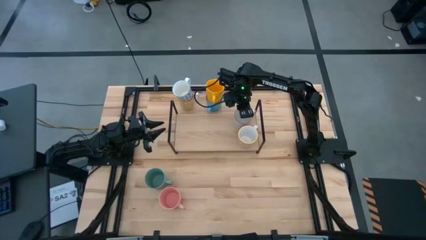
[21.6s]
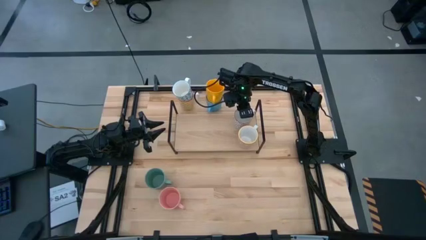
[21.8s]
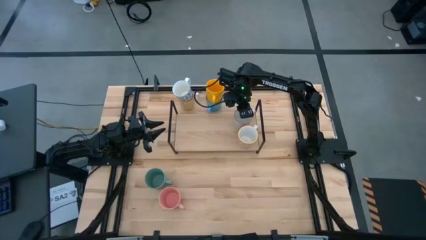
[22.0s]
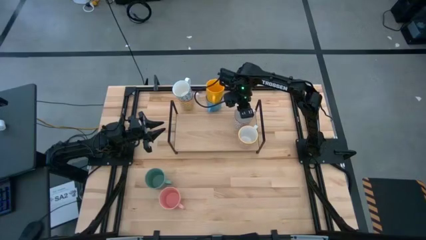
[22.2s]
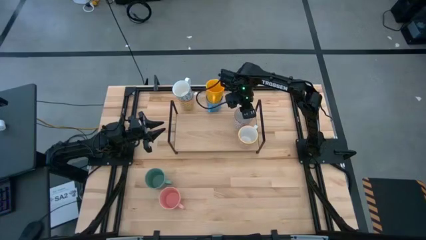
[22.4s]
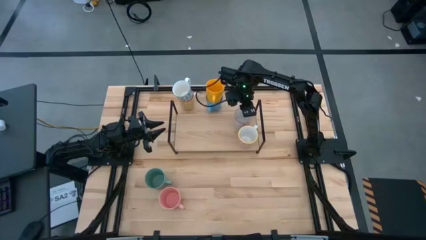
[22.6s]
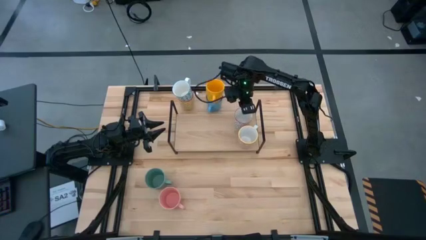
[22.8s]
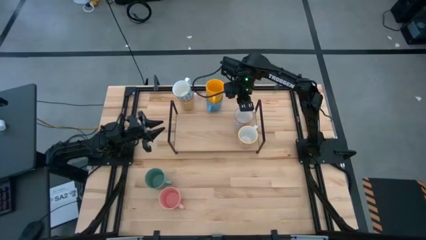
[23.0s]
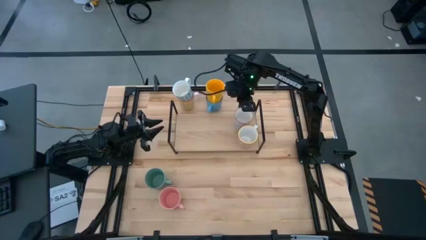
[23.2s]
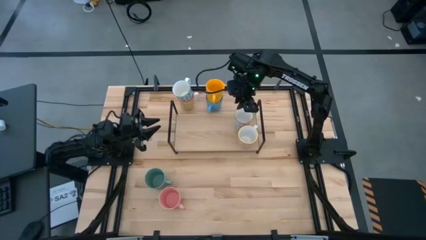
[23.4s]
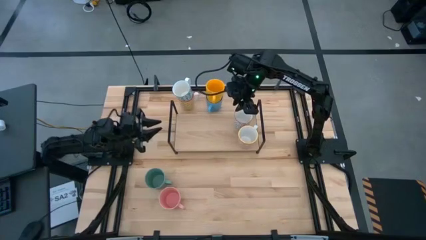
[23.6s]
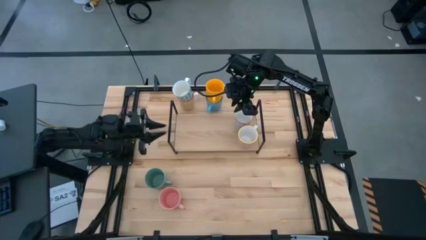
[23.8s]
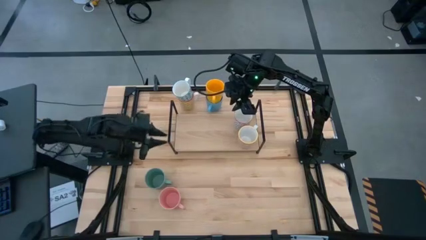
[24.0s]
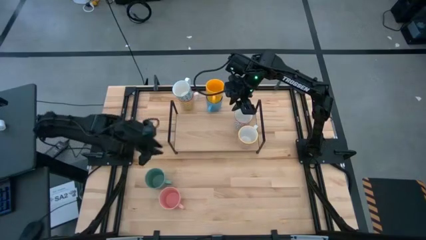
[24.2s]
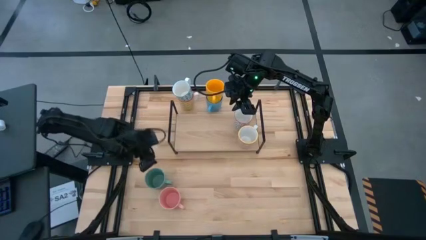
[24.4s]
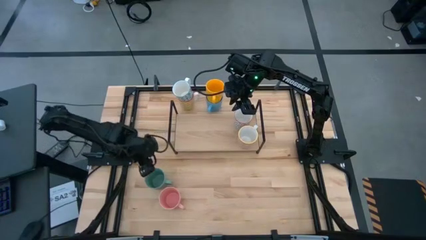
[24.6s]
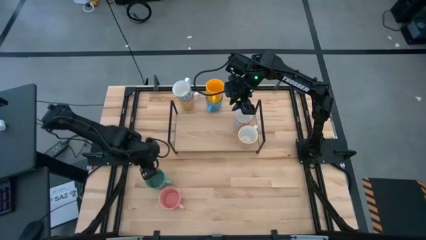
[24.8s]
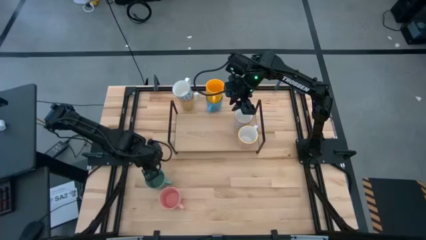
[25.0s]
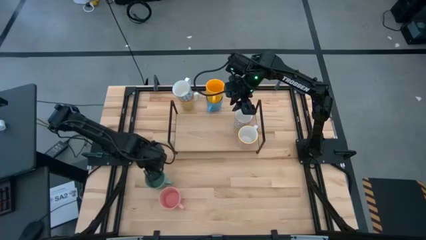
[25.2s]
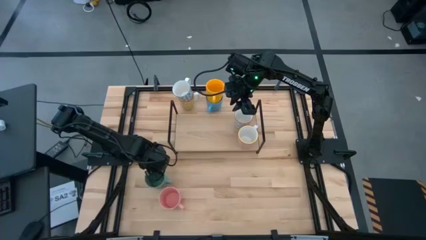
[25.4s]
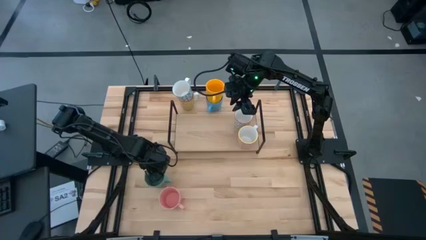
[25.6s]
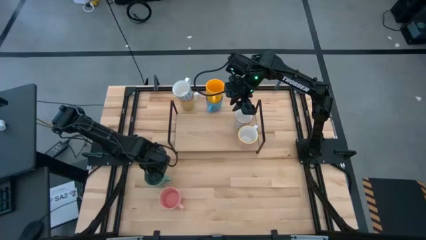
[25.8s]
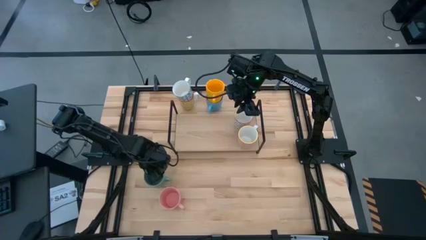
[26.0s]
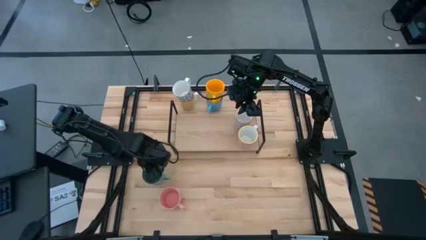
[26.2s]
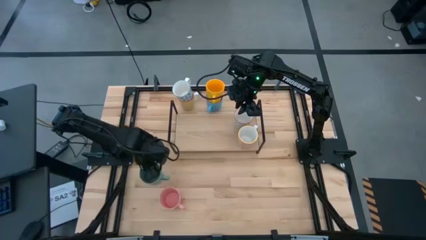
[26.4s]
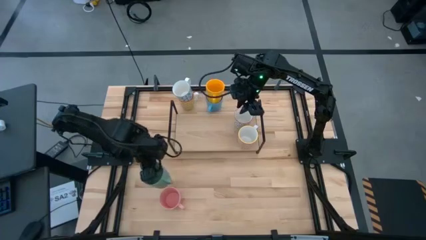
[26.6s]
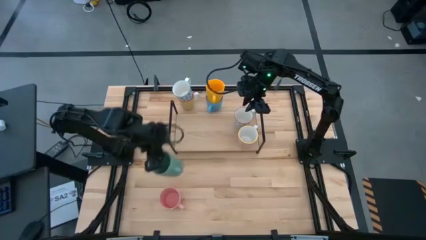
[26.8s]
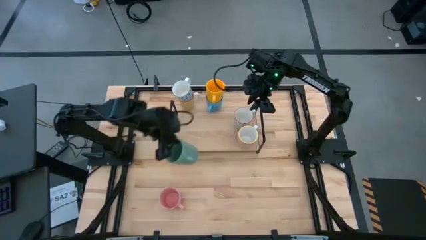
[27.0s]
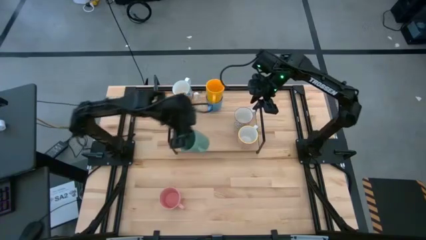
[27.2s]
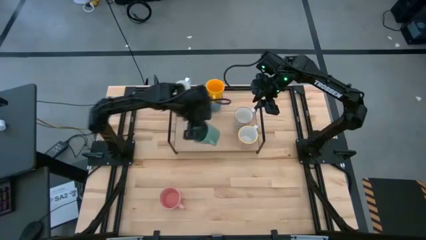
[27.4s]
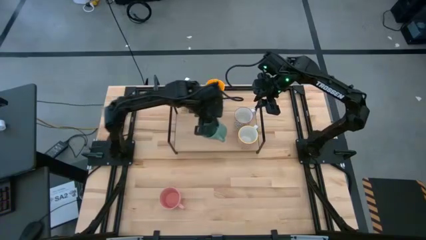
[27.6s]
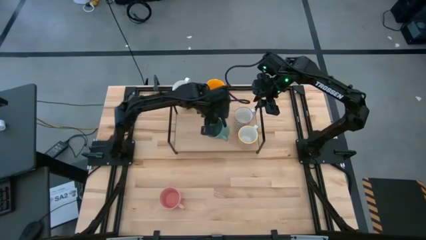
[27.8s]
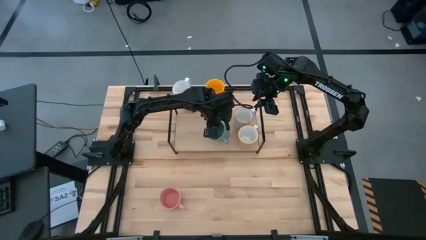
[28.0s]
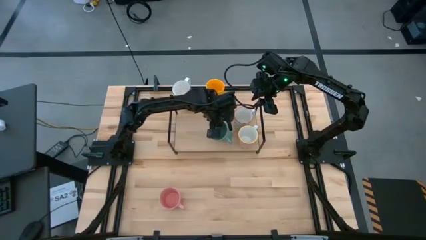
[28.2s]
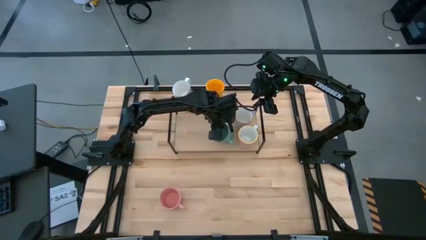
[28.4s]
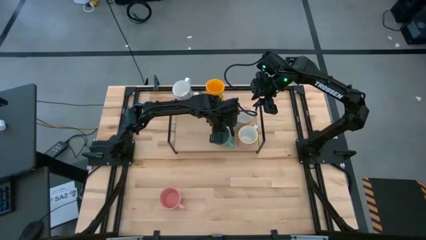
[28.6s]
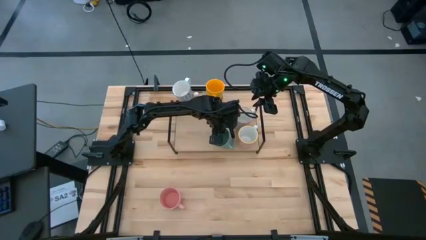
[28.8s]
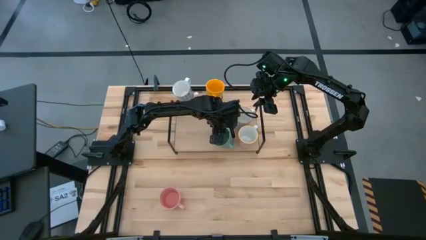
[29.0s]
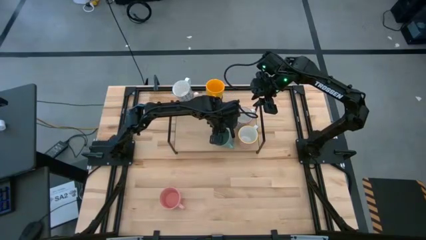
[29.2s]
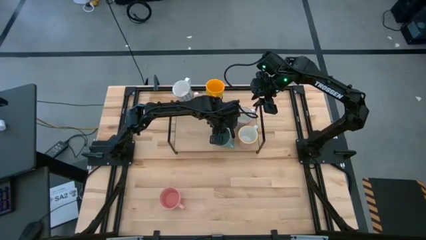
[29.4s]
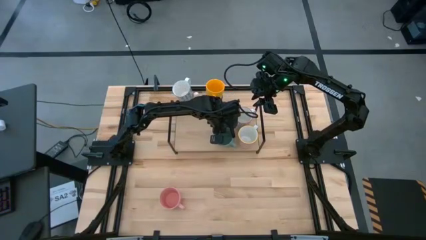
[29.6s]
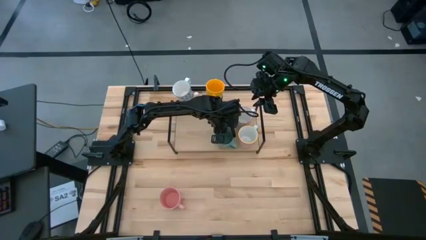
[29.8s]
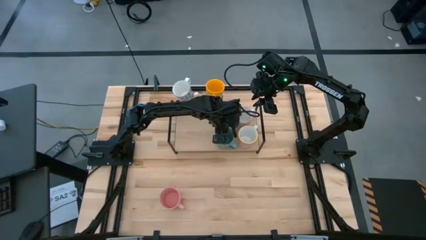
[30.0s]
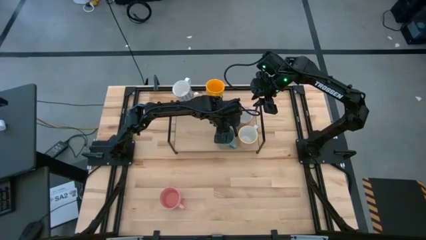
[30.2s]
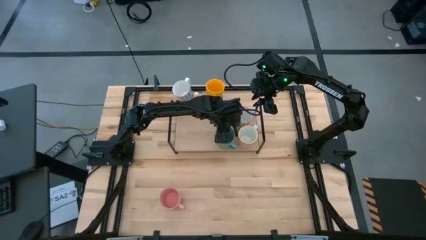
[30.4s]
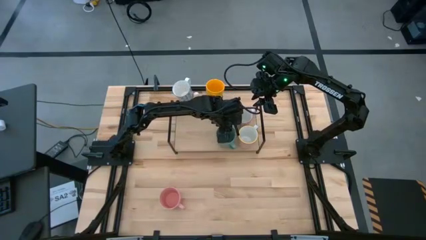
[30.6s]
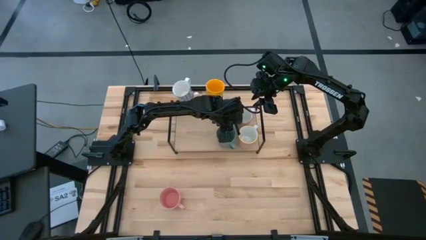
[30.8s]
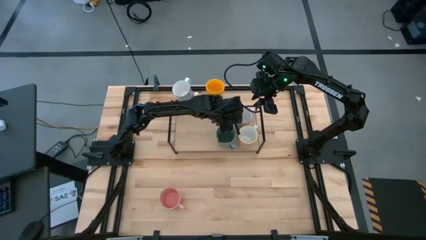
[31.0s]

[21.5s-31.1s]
Task: Place coffee mugs
Put the green mug on the shelf

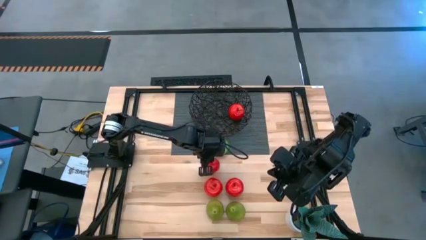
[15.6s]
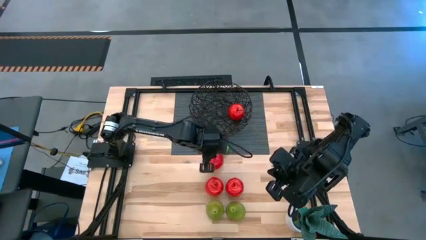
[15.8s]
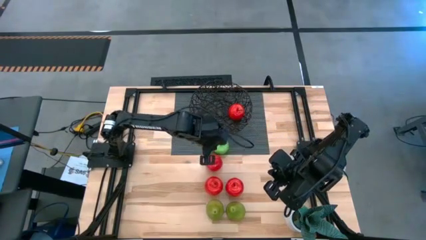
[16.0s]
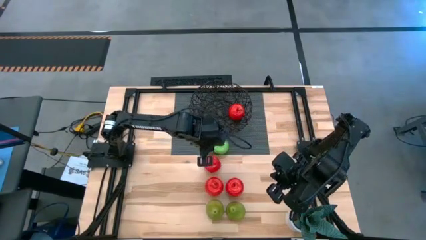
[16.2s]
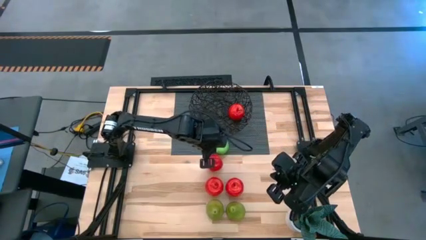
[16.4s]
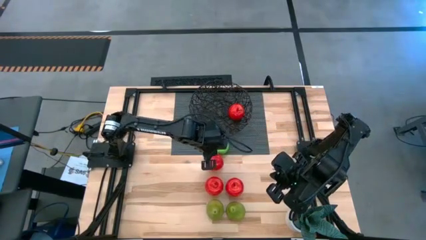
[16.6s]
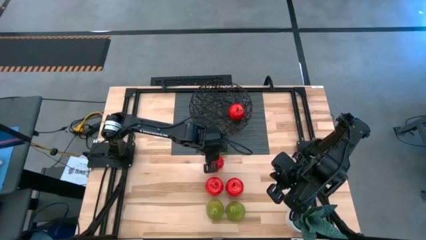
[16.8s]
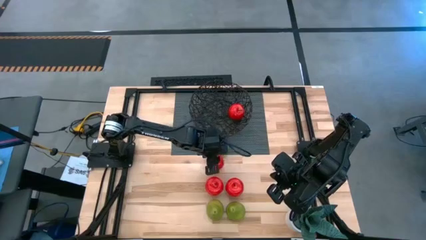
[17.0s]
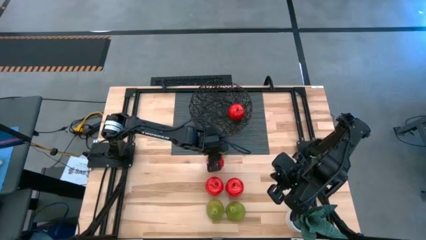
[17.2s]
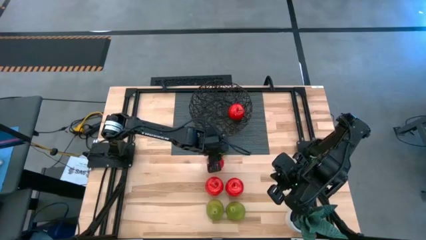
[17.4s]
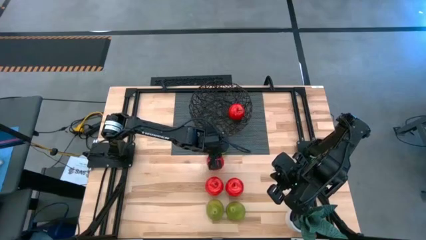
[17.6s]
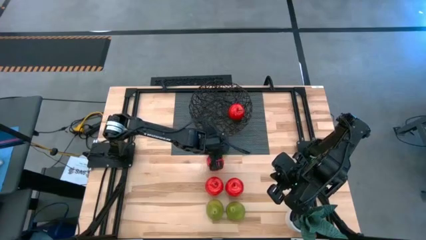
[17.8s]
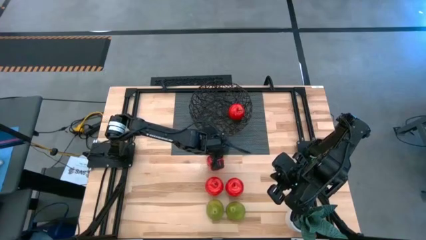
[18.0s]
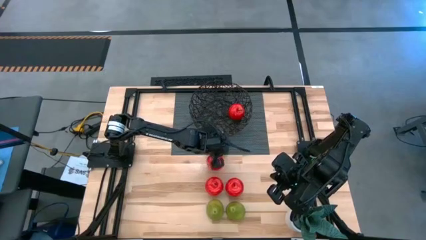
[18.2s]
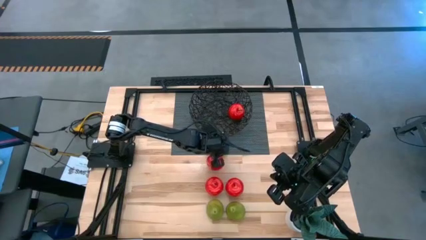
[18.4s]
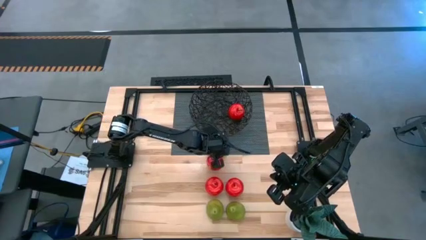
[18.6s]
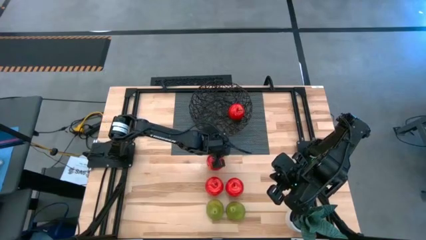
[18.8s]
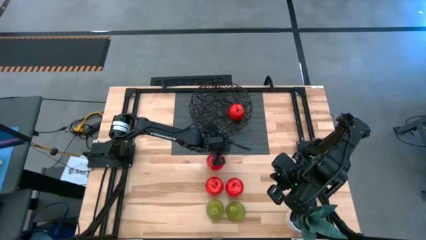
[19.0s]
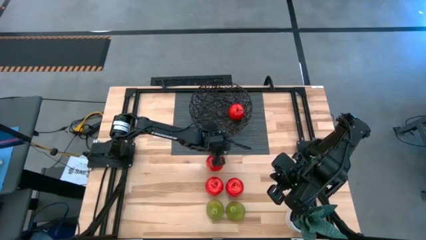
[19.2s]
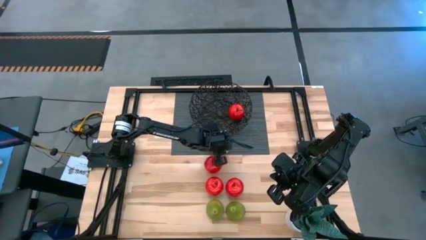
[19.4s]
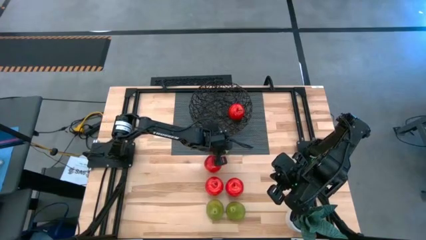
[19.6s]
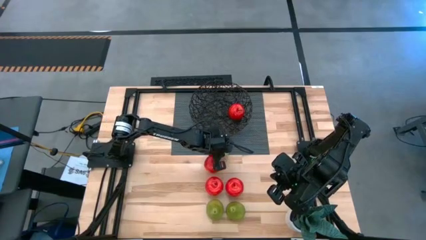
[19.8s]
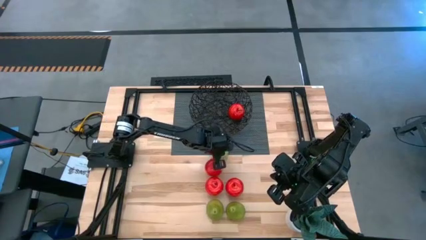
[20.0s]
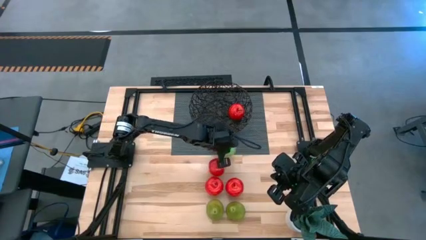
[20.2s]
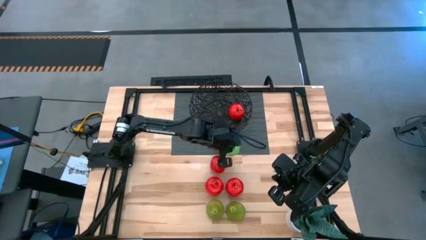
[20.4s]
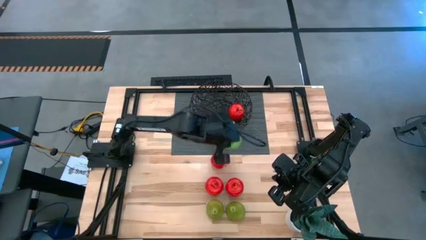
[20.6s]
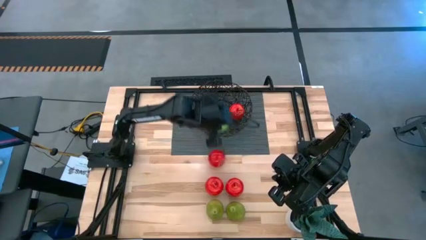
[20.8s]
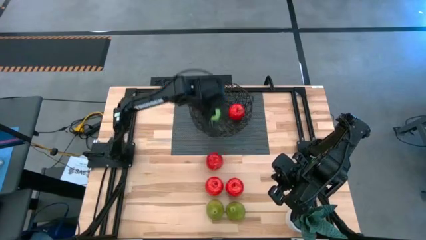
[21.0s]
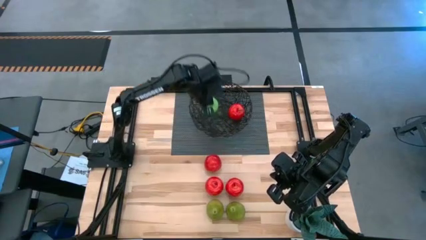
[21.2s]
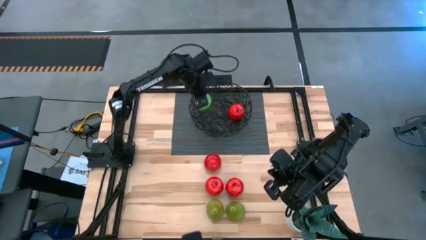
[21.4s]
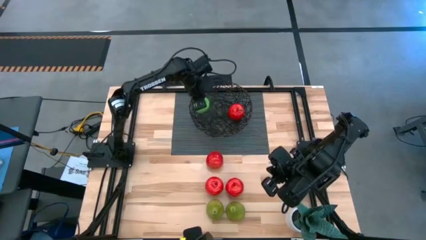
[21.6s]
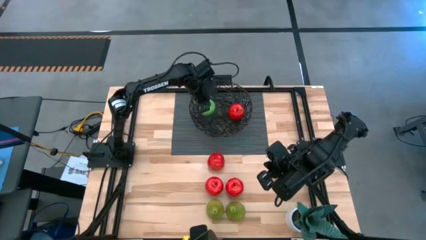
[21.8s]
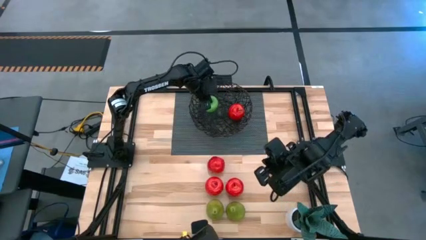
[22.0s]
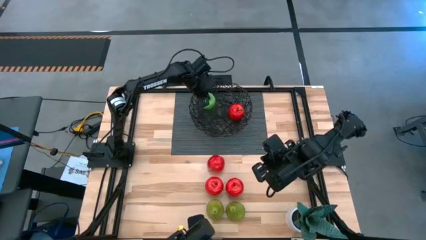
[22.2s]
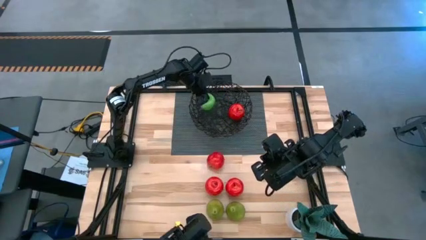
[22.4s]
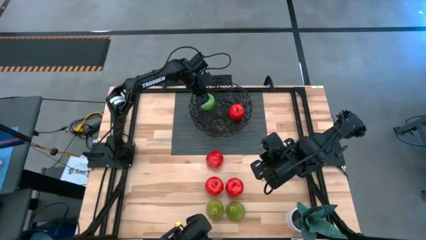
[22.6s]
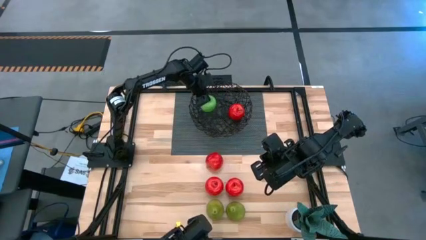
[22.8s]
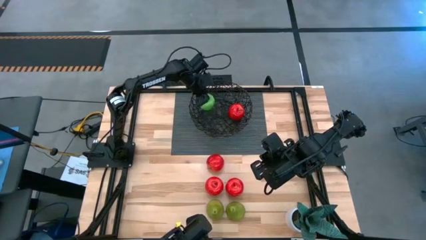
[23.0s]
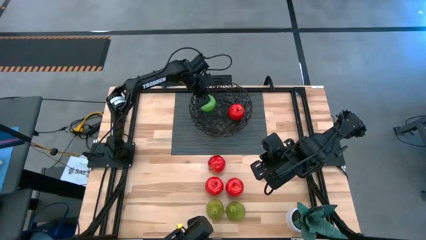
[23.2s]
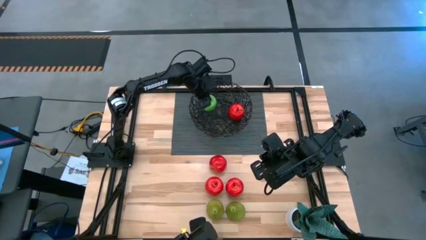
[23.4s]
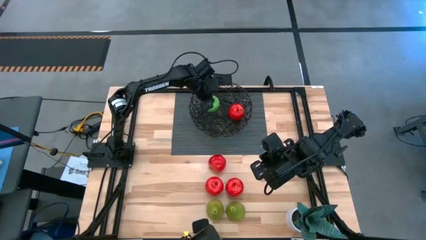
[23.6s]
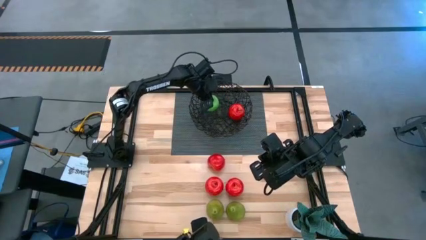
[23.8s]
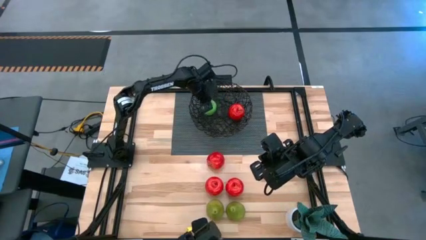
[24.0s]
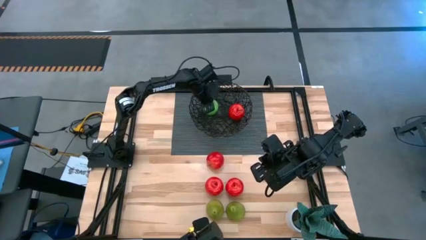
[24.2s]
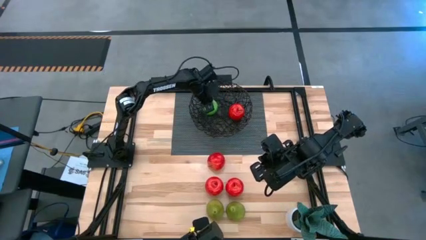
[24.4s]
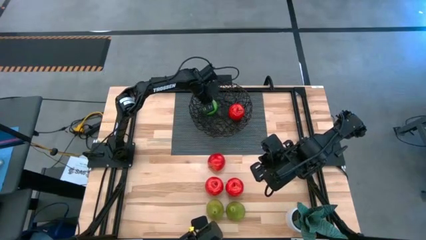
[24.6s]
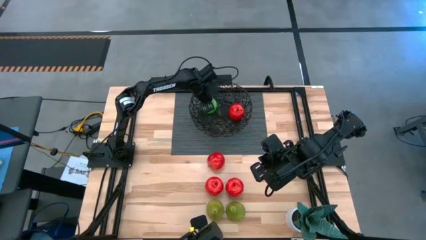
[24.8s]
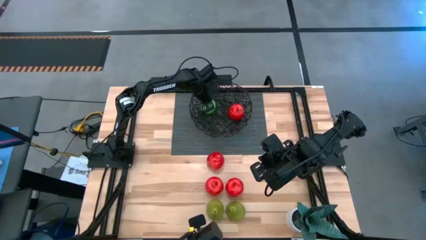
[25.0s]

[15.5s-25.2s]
Task: Build produce basket
Put the green apple into the black basket
